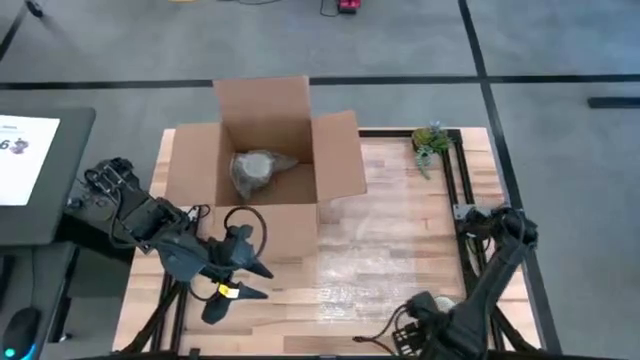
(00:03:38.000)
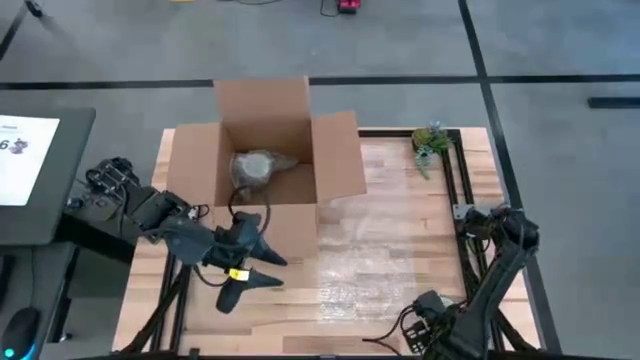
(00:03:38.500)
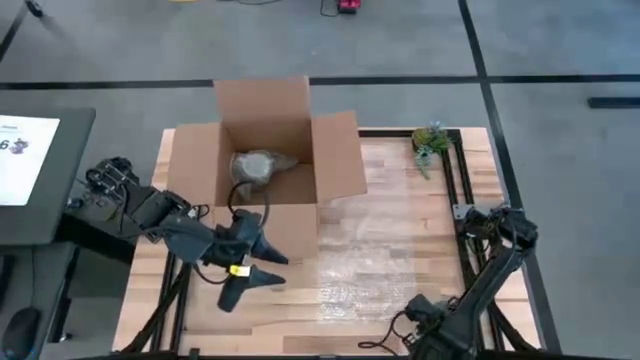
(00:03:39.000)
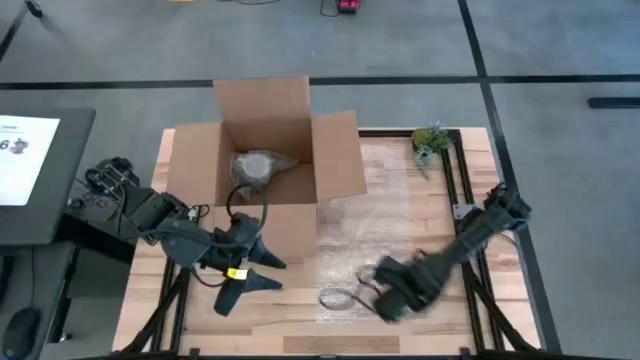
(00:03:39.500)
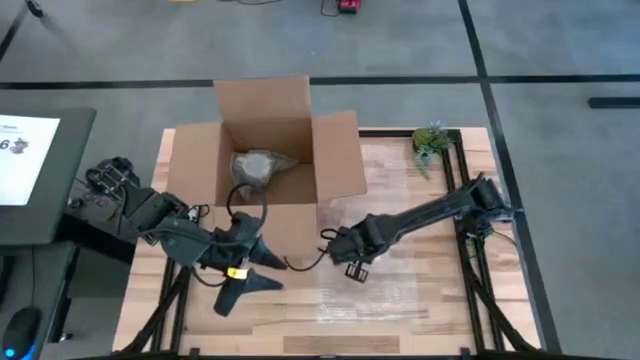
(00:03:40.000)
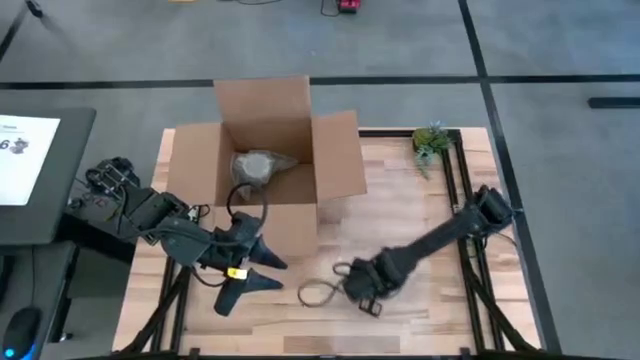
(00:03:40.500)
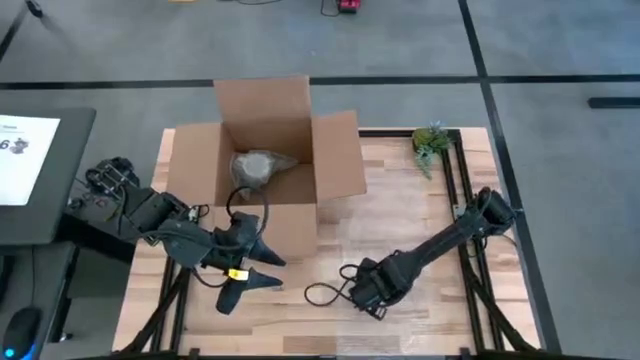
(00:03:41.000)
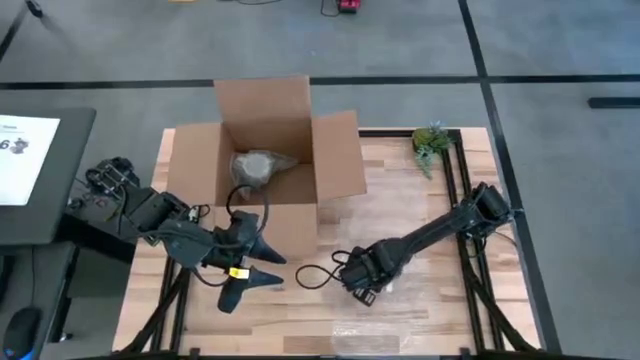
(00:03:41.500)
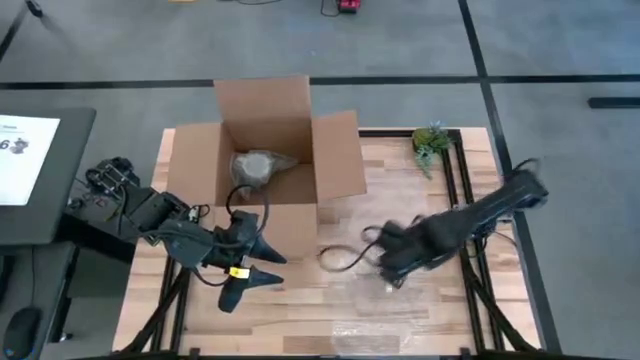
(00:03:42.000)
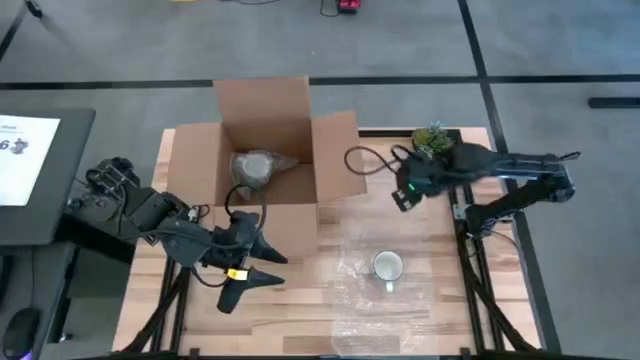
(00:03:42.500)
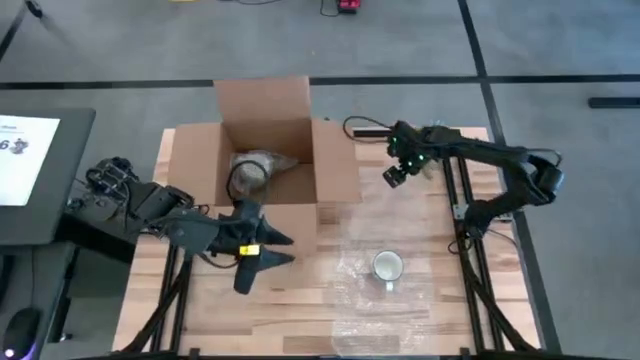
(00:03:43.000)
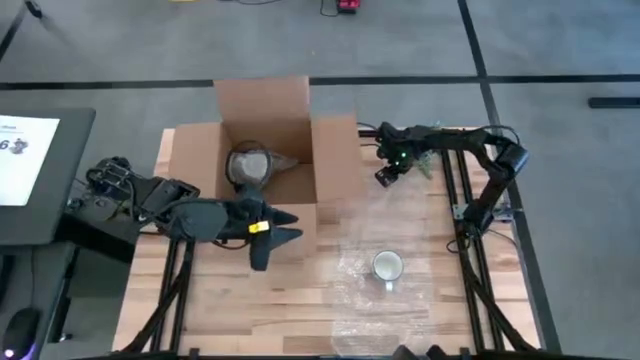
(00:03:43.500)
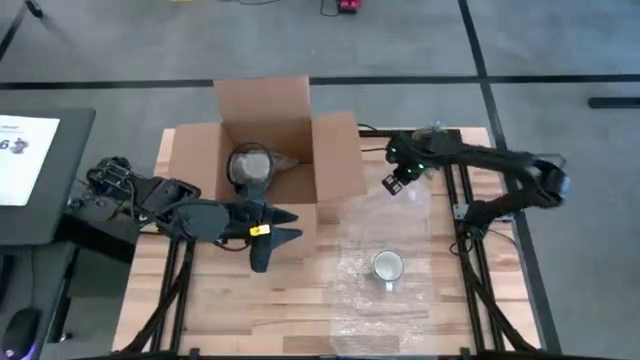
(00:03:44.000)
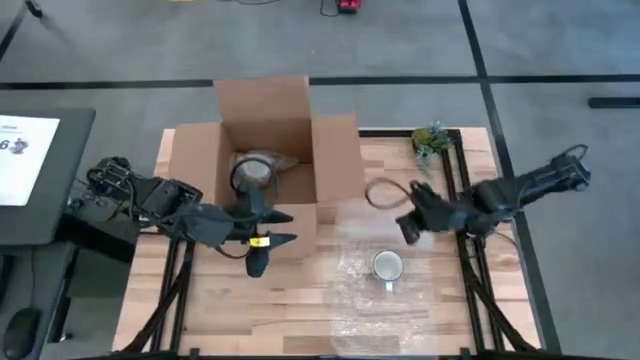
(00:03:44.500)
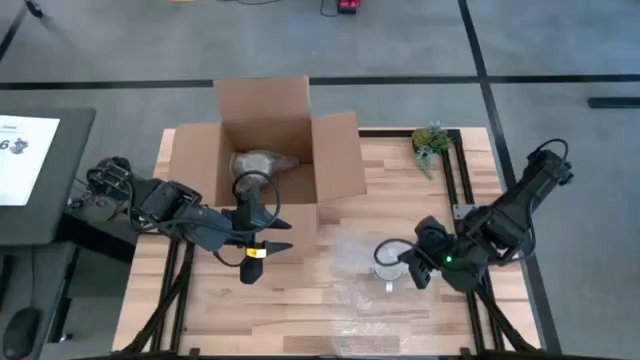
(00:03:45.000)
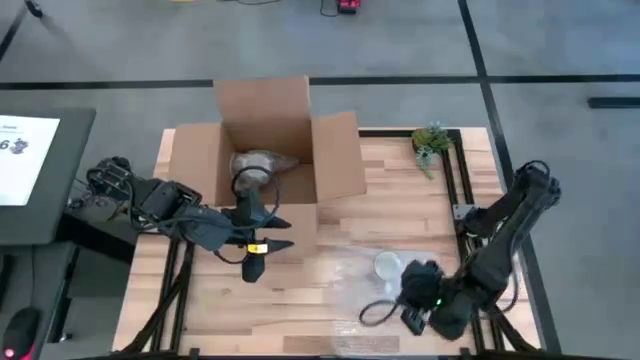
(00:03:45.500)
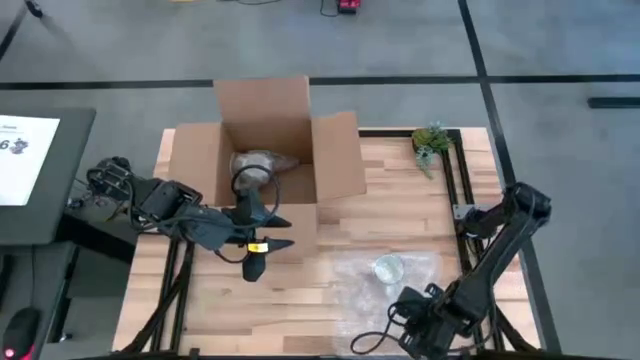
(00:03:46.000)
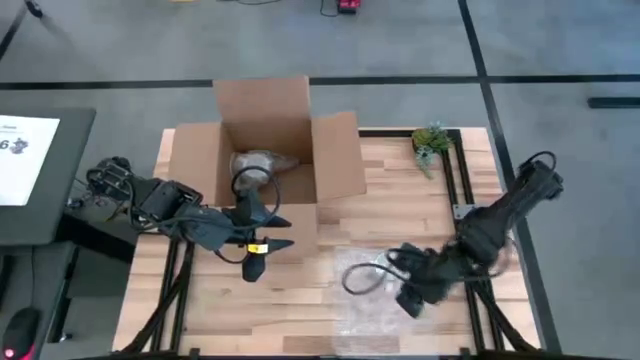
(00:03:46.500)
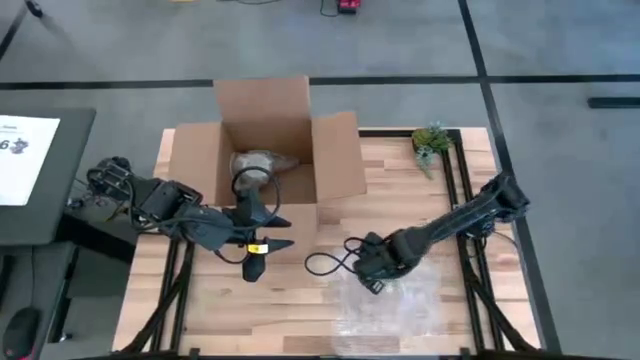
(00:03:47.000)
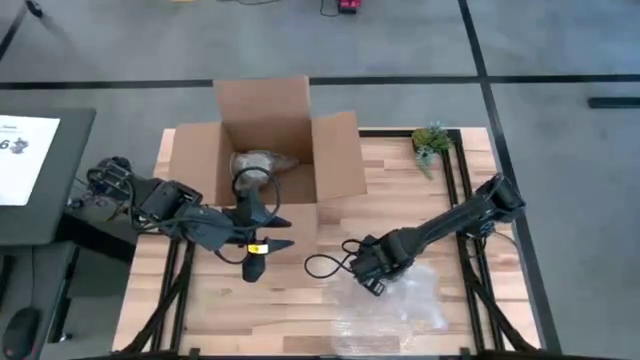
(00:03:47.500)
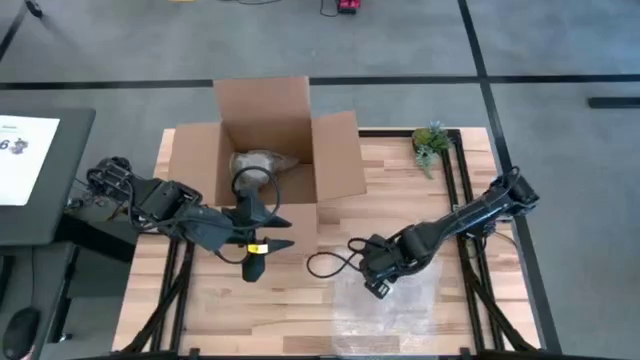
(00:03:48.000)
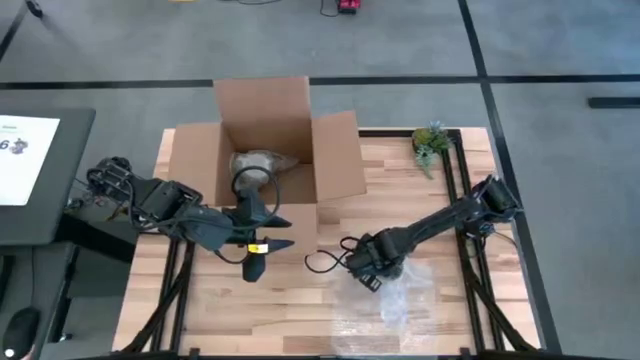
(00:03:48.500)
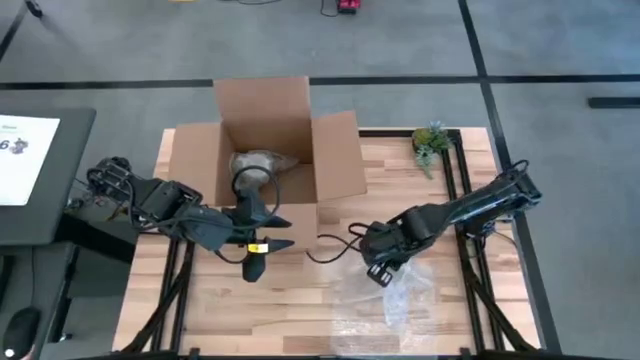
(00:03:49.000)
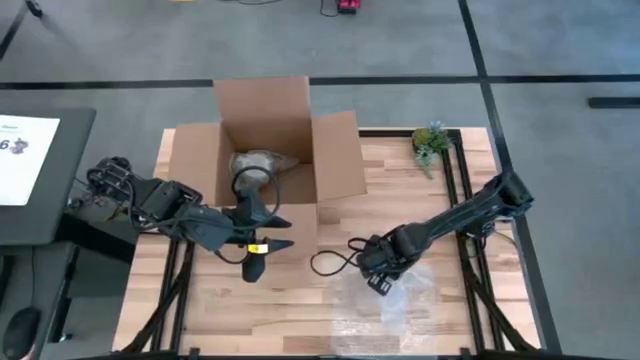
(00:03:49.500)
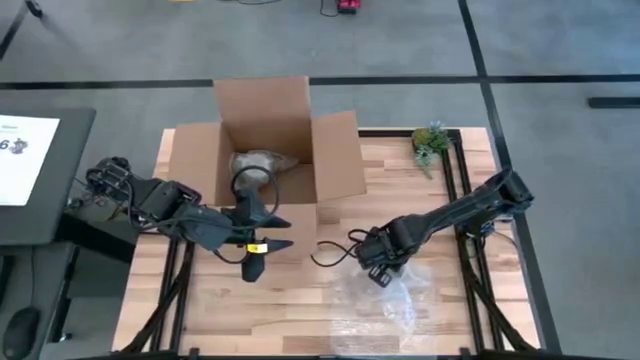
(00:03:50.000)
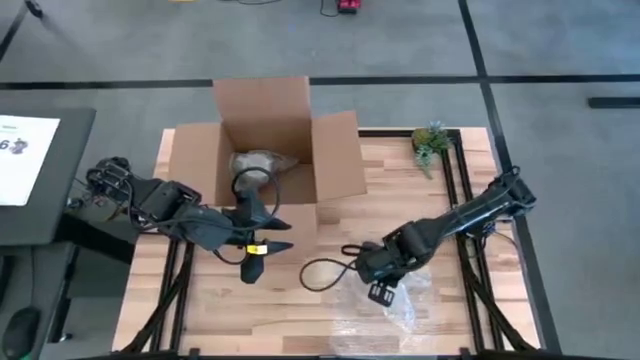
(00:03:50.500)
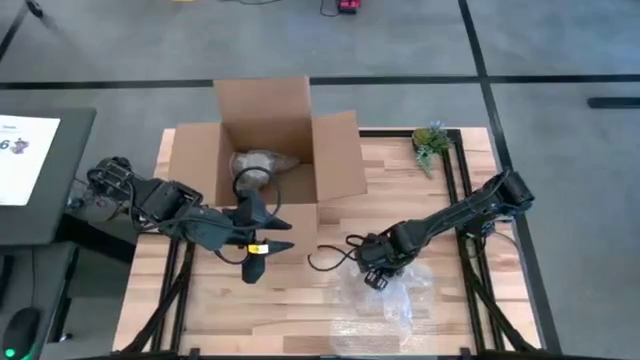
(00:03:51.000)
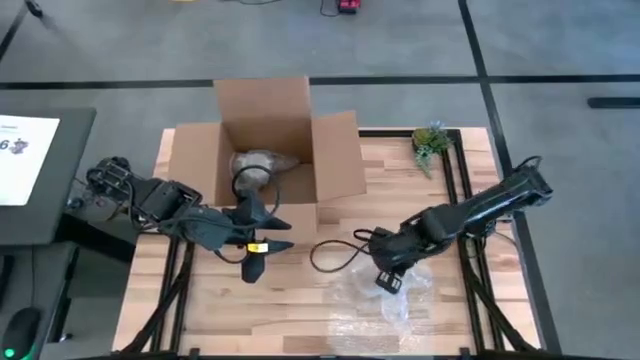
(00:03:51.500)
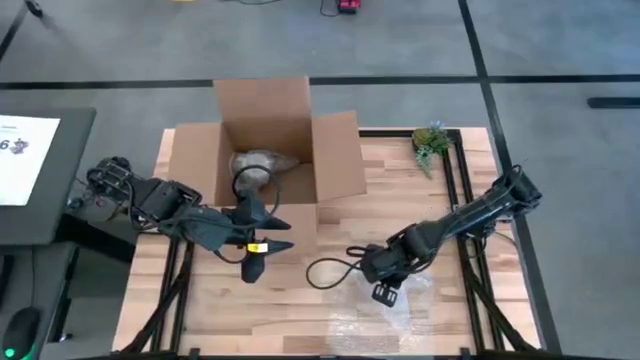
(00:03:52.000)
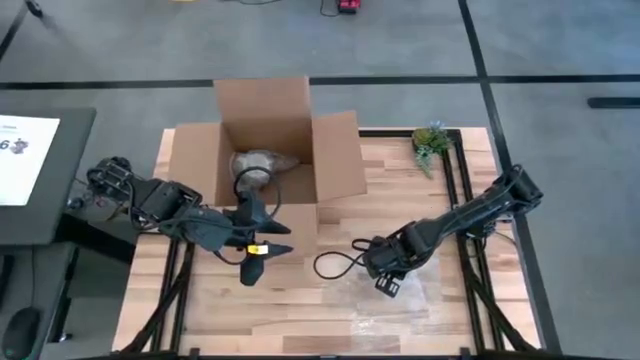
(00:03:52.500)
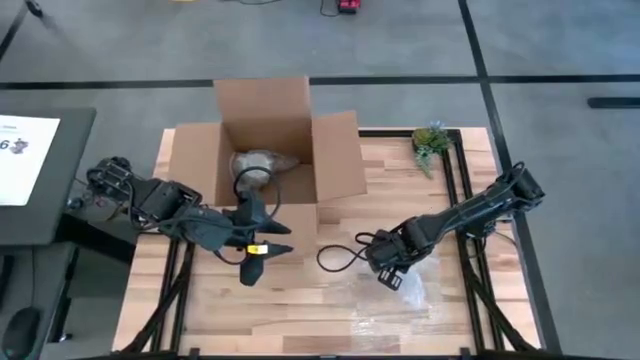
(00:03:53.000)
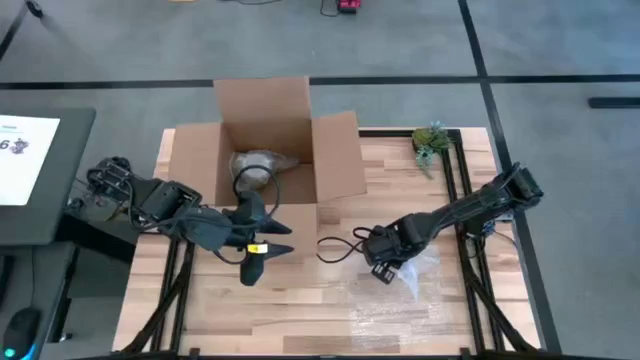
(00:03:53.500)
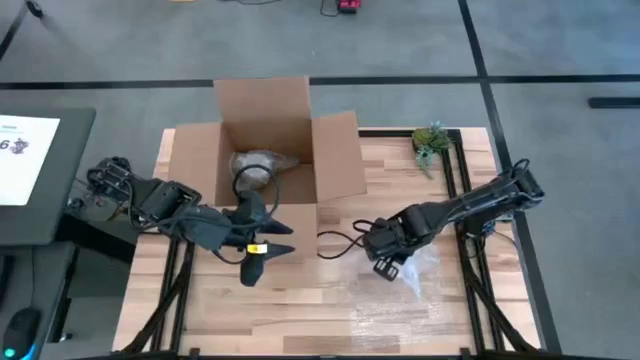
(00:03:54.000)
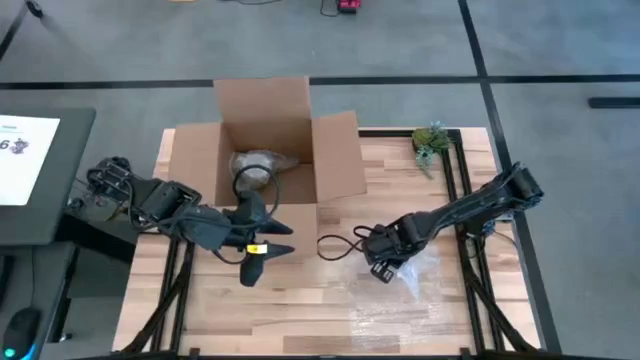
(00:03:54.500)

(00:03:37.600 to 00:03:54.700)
Task: wrap mug
Wrap the blue patterned mug with the bubble wrap

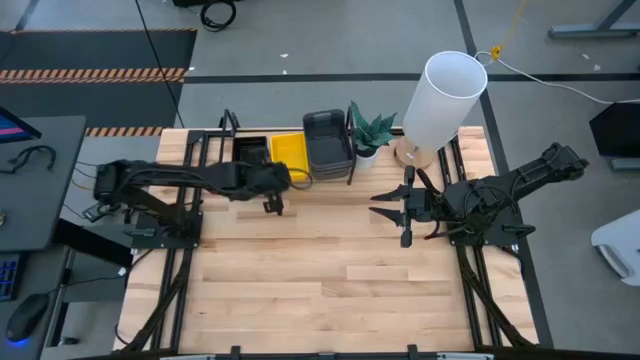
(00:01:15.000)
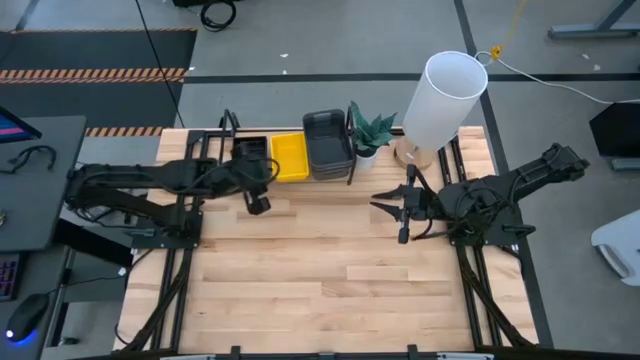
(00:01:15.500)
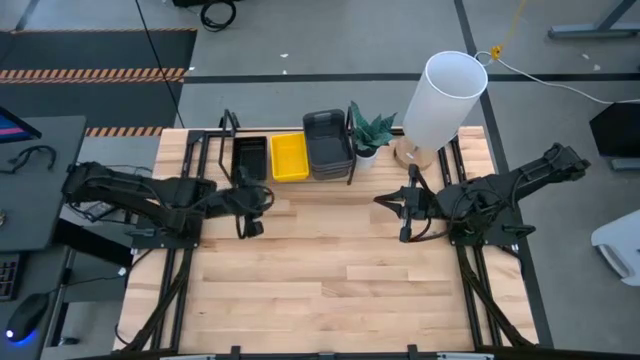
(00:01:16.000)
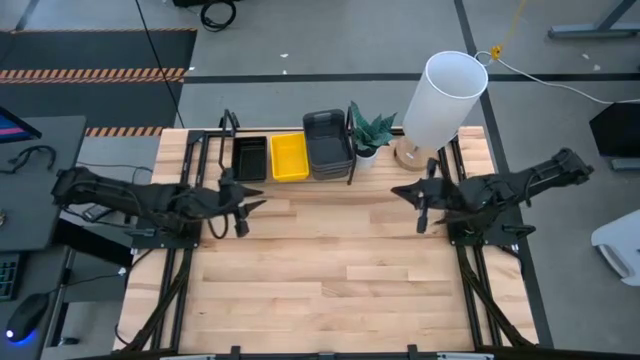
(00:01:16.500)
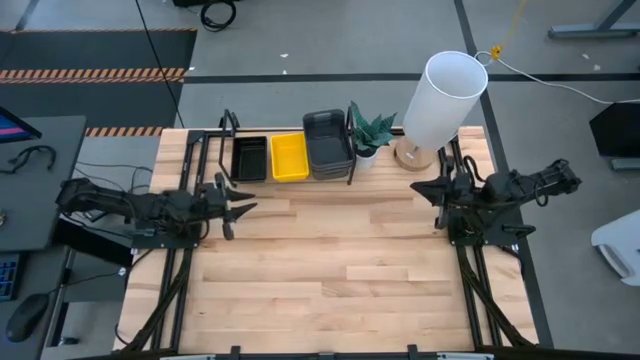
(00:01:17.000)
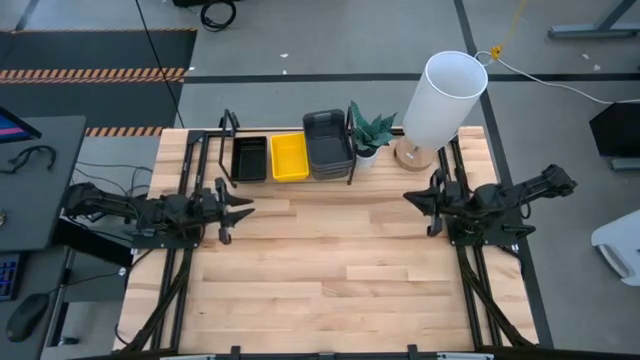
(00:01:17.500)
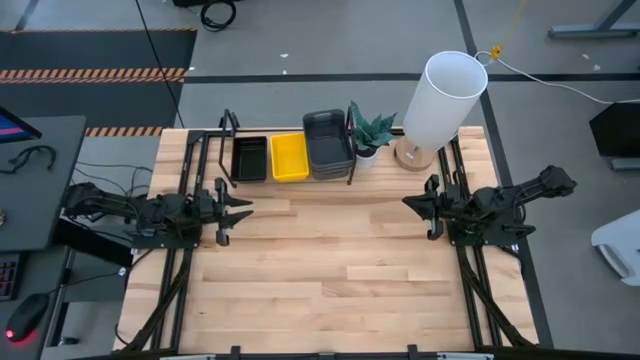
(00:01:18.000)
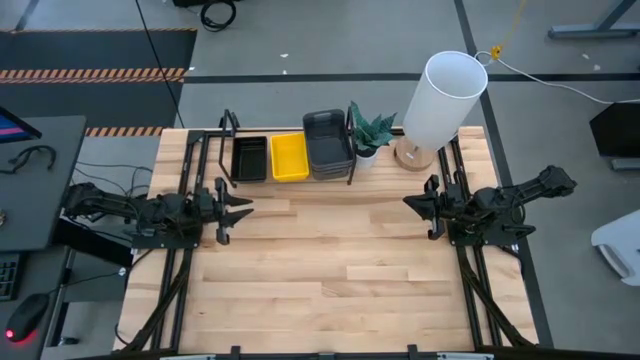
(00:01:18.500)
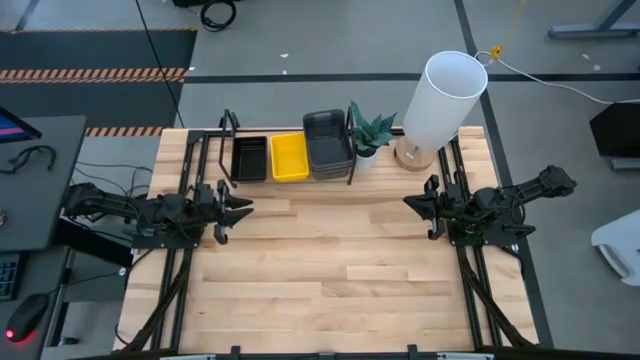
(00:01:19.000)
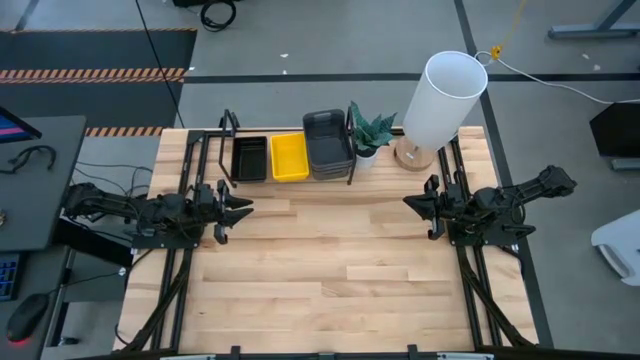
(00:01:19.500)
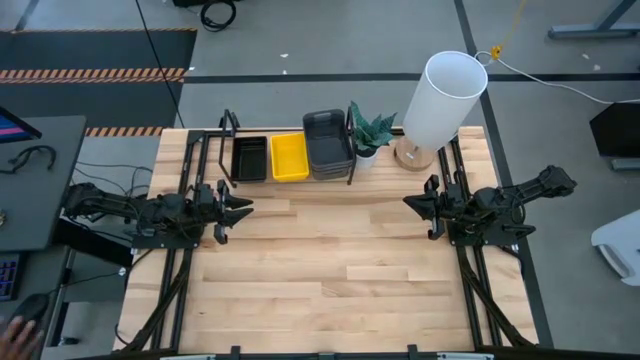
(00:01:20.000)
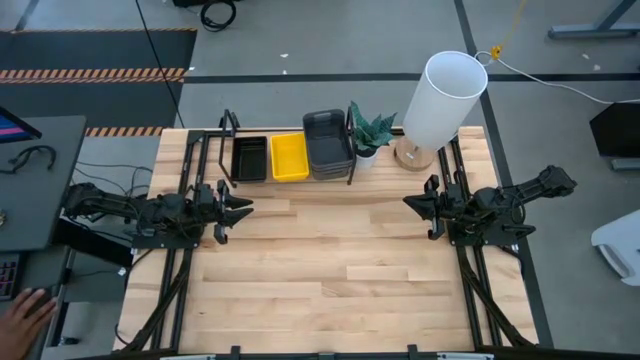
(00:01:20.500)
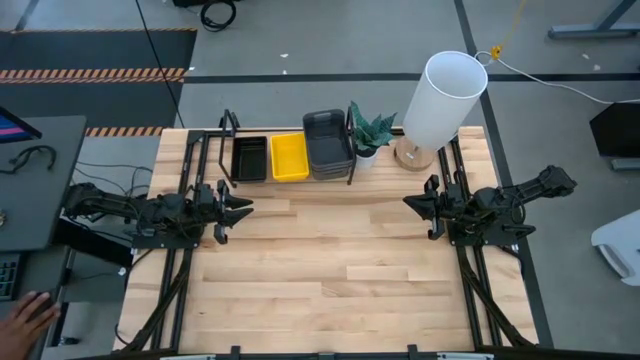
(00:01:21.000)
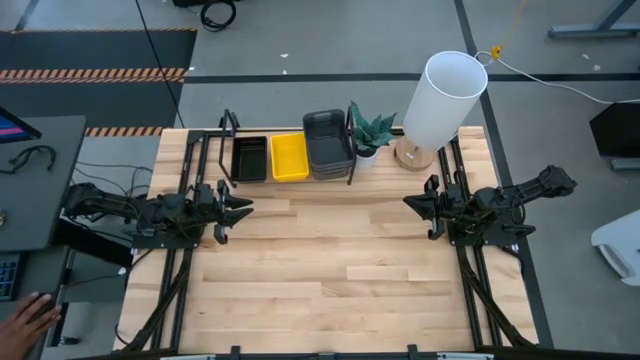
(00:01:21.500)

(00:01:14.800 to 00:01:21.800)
Task: Stack baskets on shelf by color
Return to Home Position
